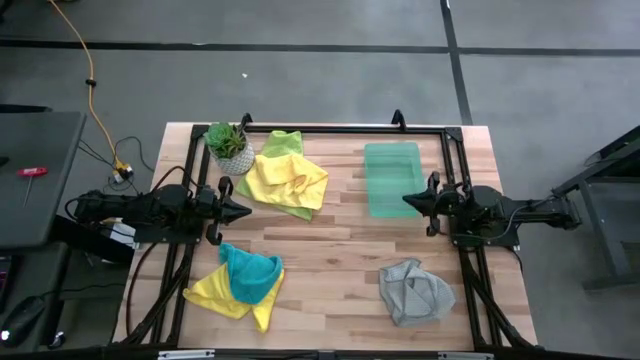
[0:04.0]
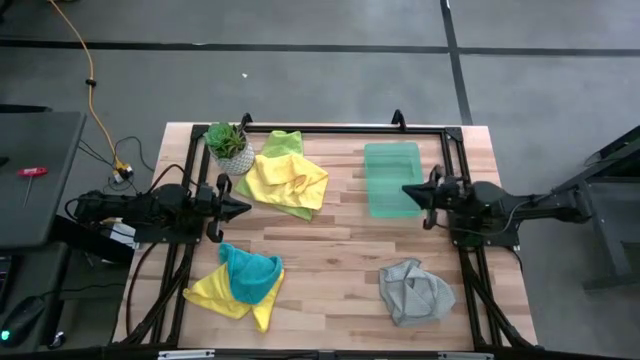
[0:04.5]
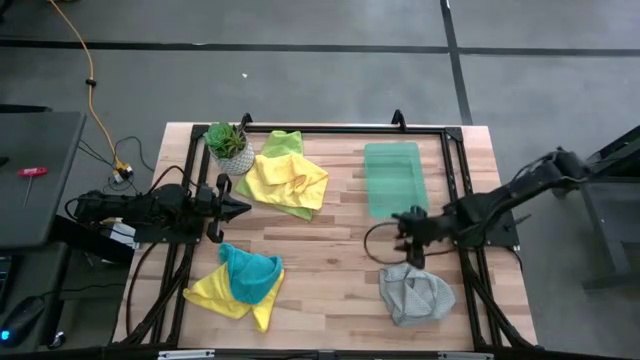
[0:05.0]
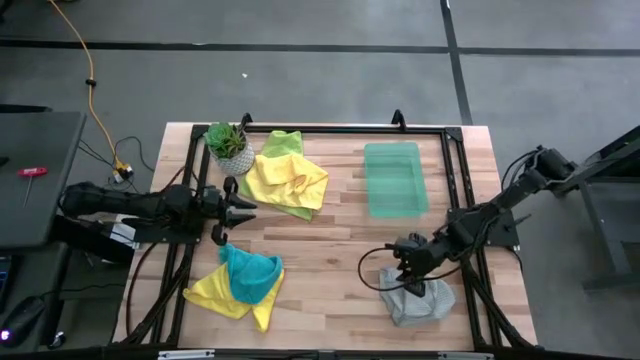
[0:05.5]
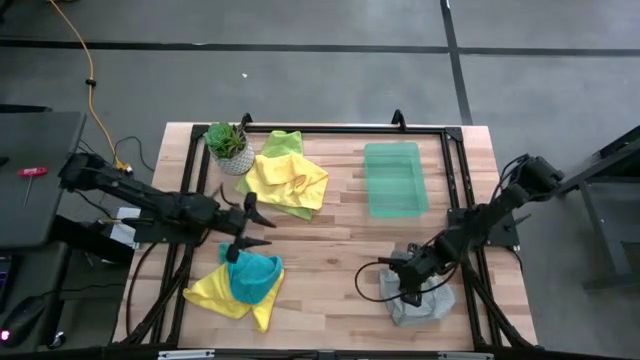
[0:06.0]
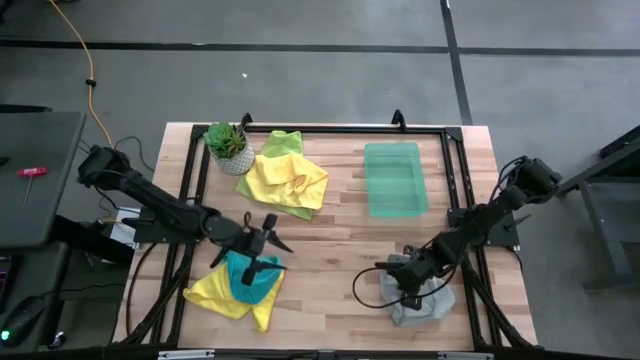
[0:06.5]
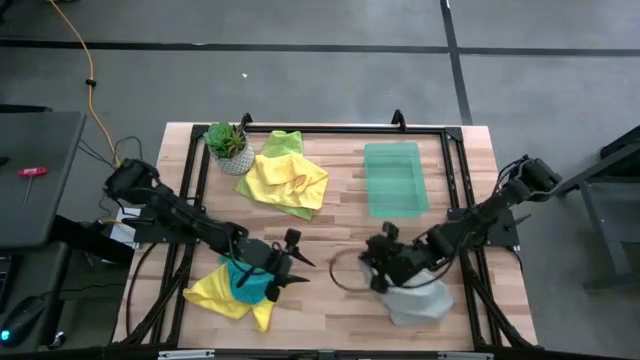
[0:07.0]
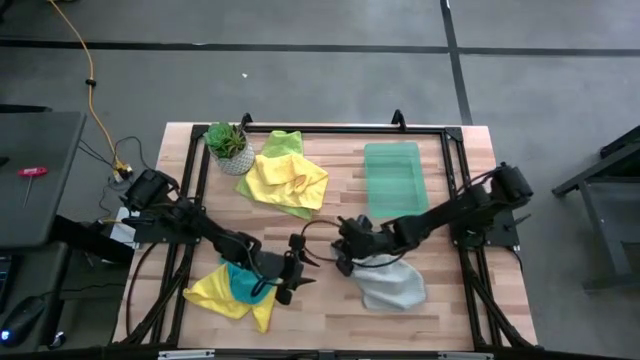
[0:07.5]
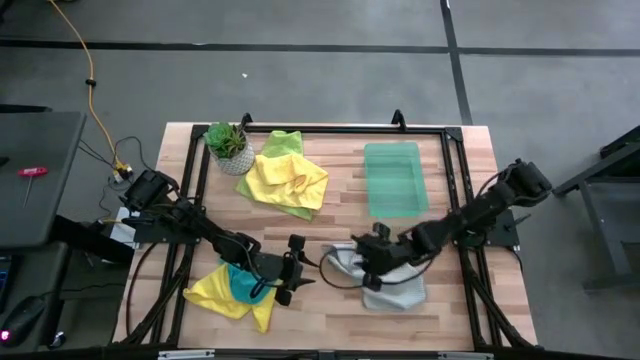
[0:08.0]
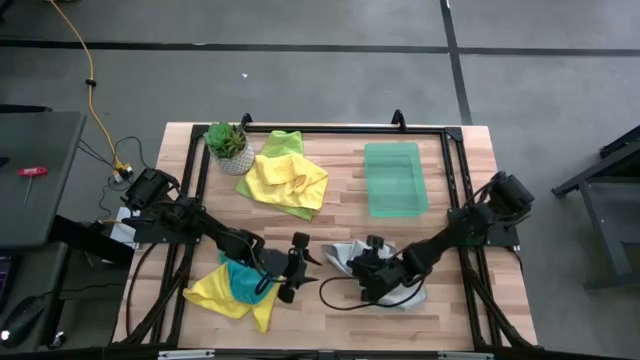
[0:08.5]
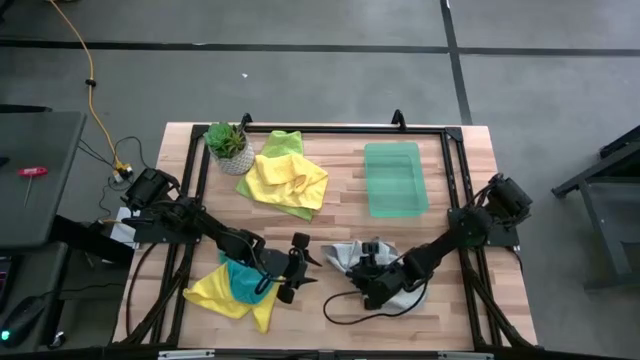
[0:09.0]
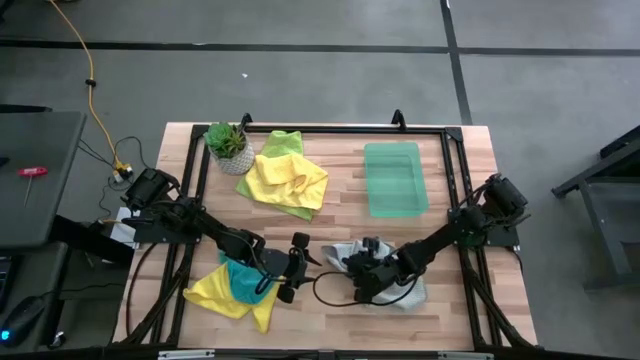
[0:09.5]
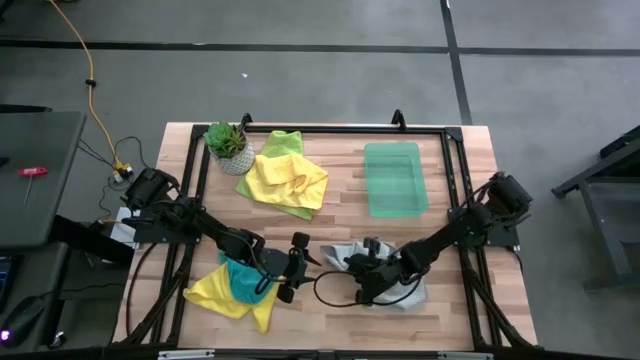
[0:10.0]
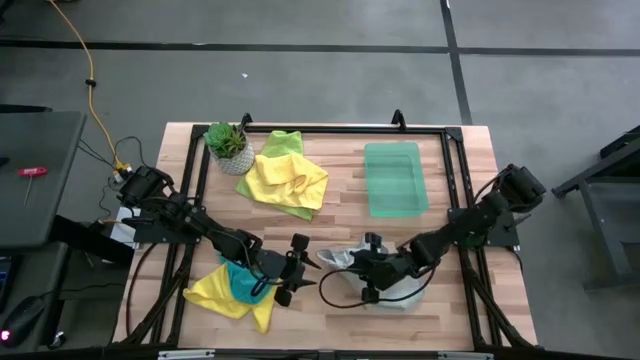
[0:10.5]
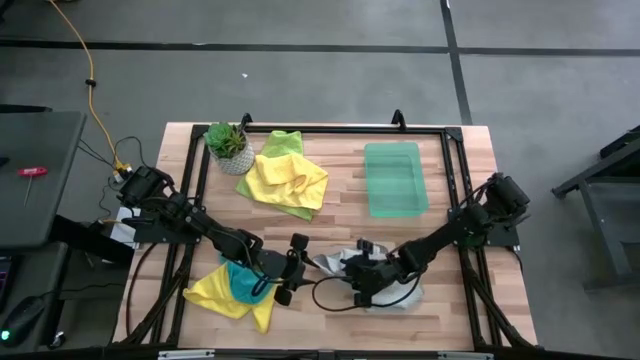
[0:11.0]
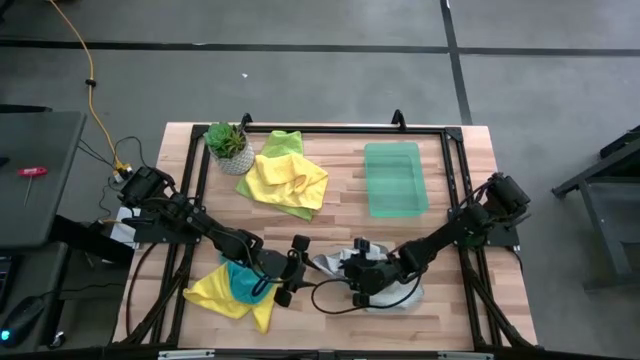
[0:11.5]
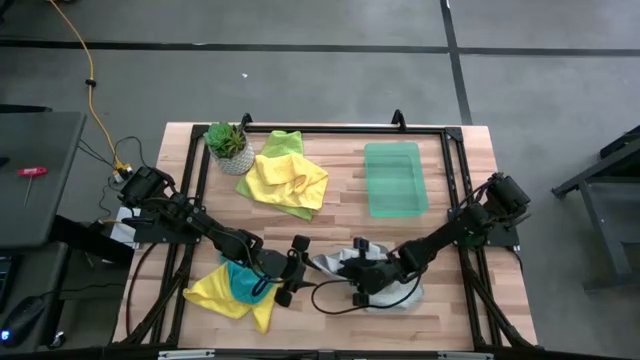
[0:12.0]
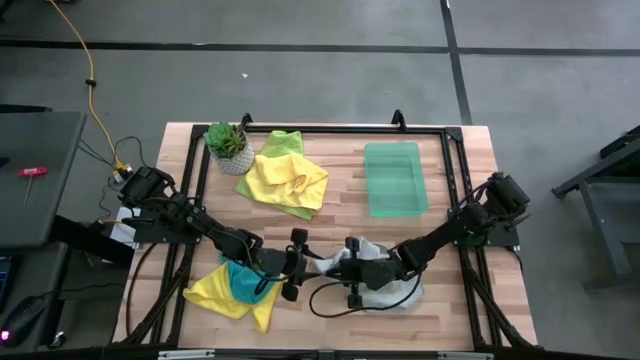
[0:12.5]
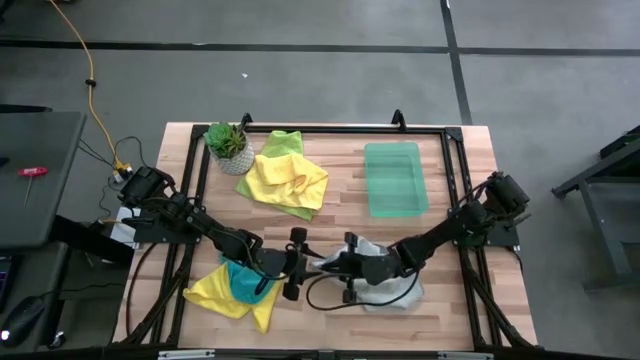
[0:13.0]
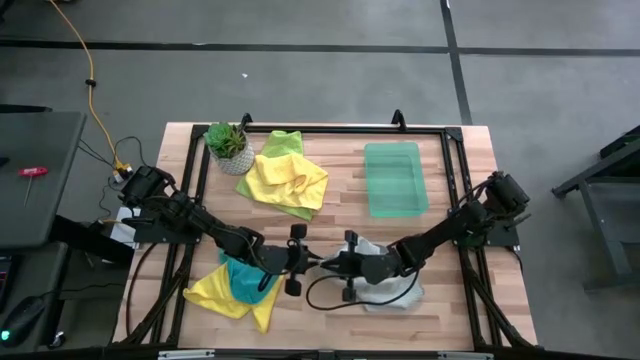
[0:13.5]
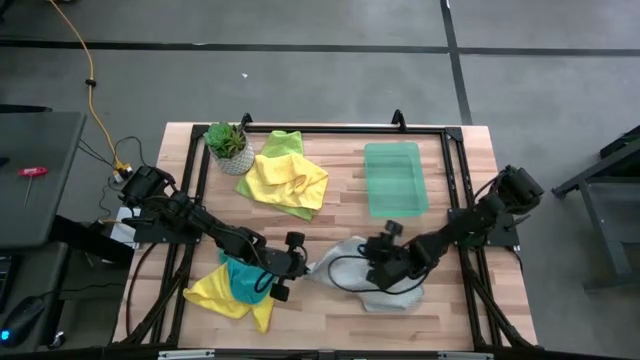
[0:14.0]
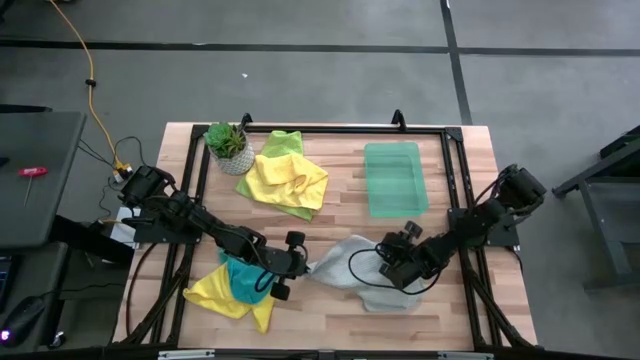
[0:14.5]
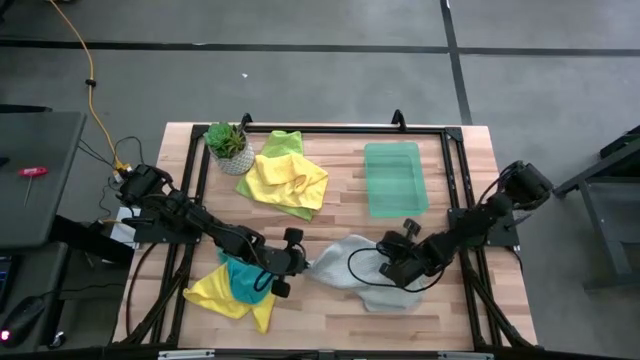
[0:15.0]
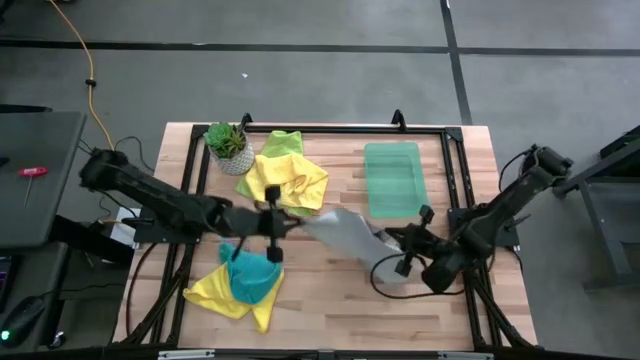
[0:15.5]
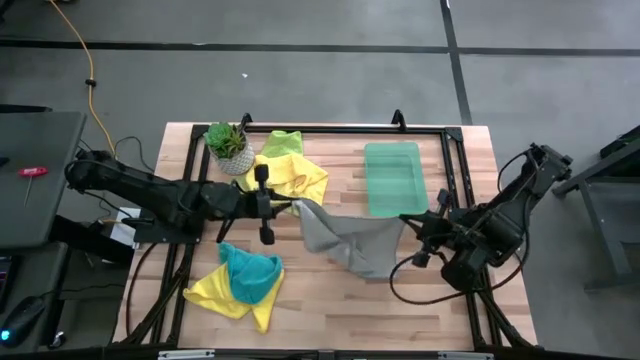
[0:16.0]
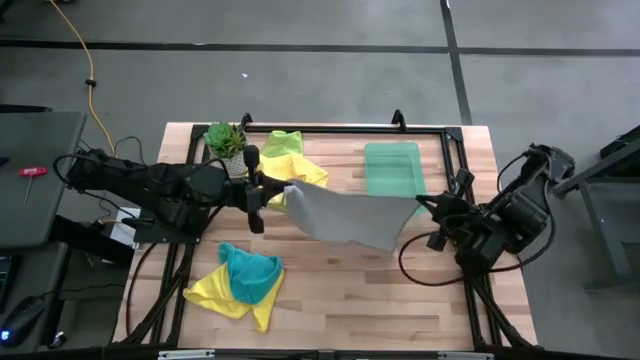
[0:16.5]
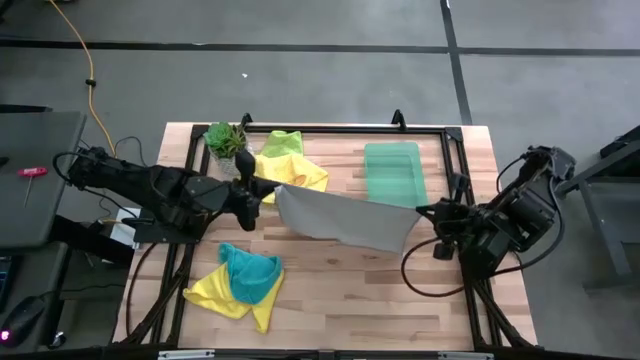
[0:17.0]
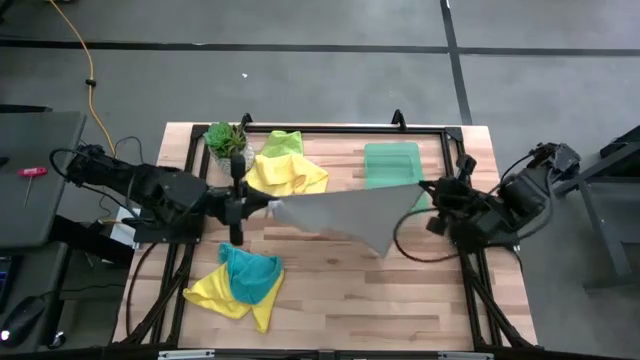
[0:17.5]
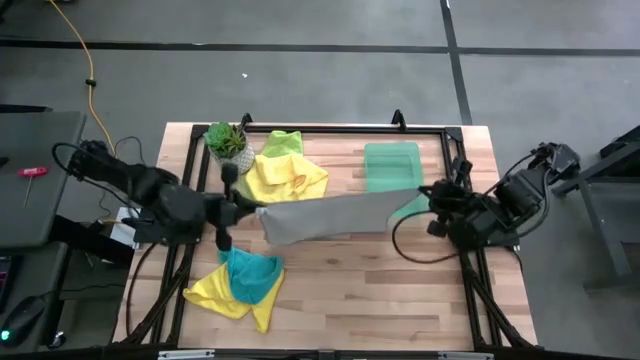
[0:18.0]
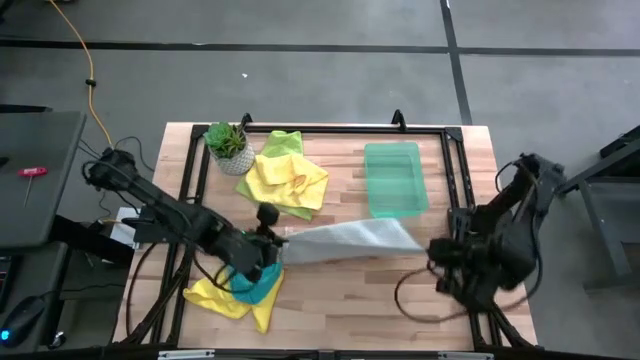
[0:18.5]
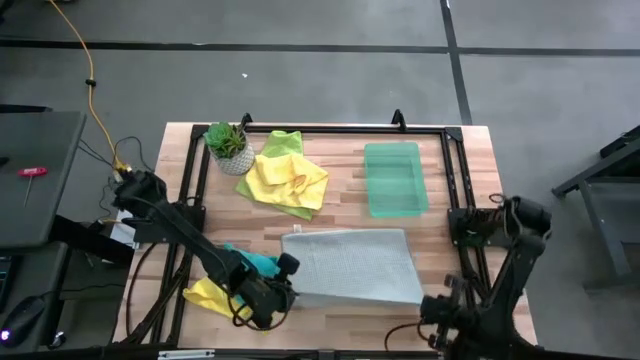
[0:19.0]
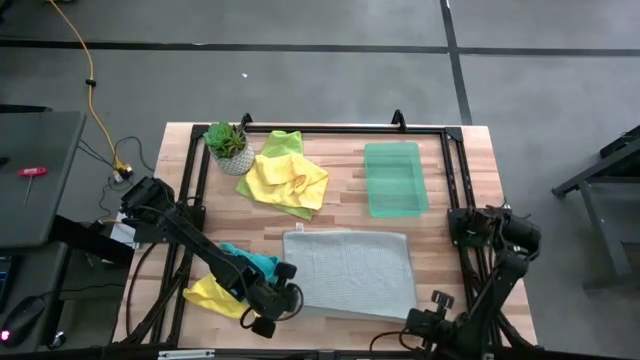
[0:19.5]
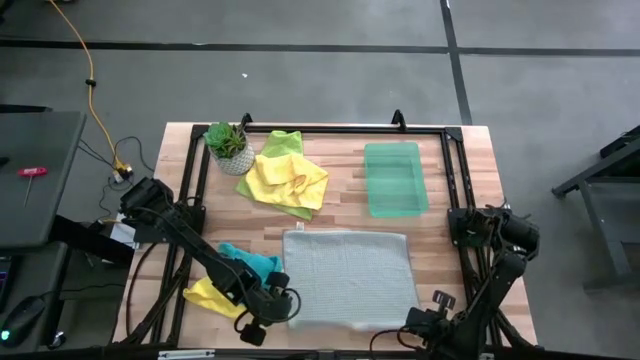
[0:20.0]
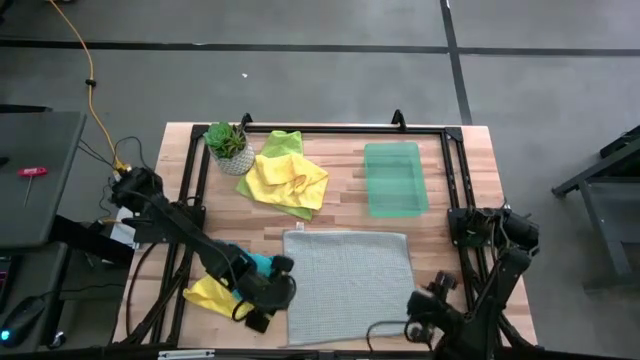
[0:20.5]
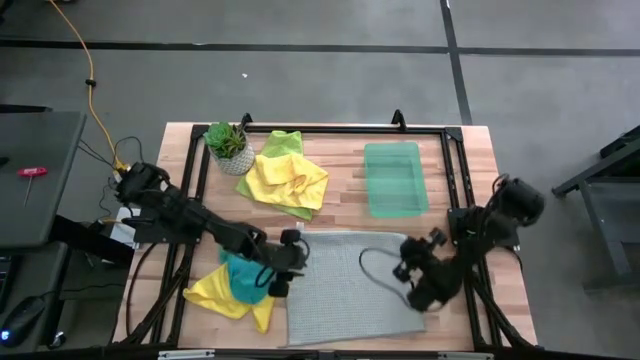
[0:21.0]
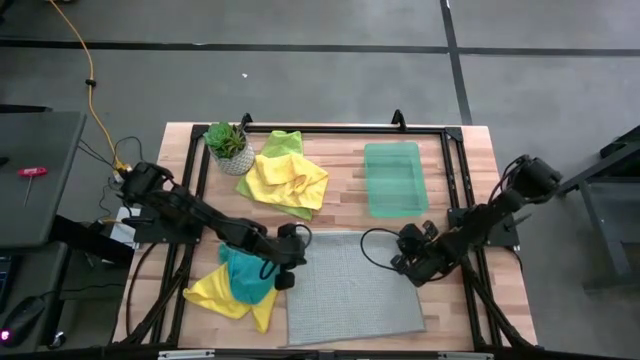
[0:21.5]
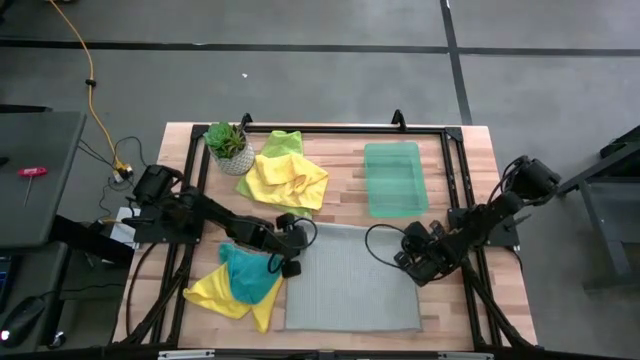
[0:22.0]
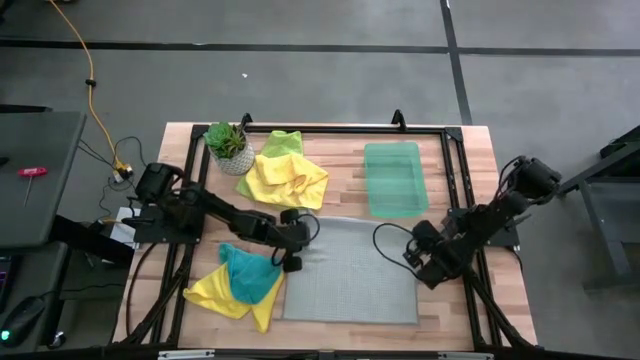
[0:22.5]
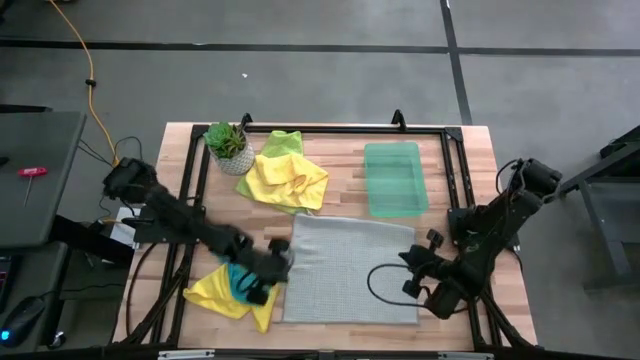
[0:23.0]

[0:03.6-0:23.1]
Task: Fold microfiber towels
Fold the gray microfiber cloth
